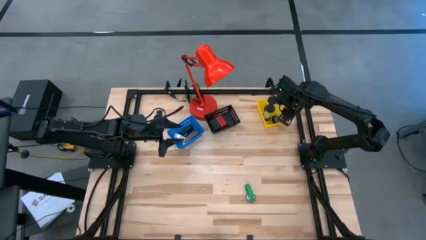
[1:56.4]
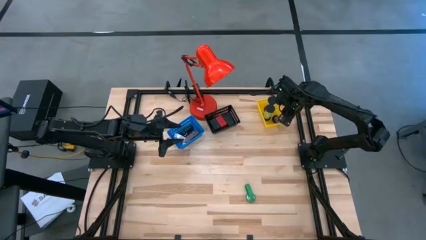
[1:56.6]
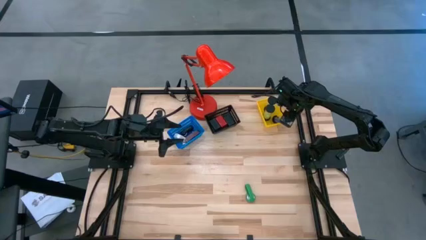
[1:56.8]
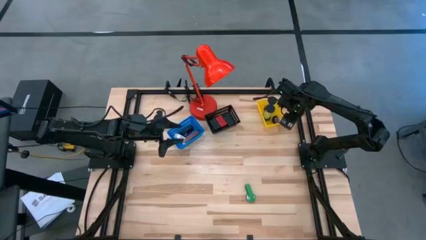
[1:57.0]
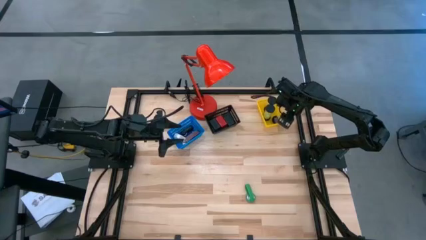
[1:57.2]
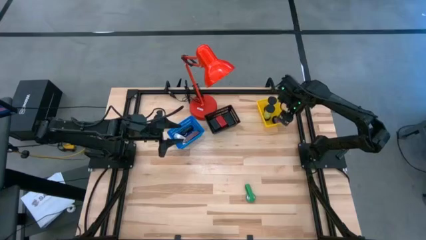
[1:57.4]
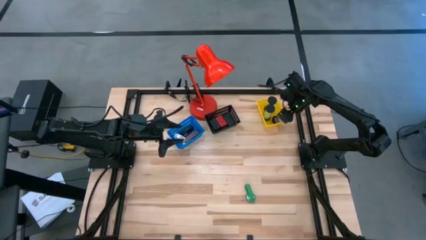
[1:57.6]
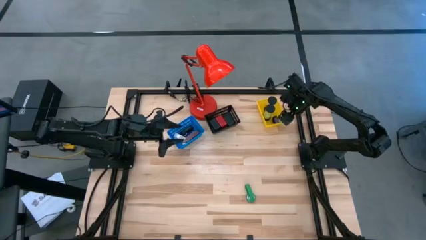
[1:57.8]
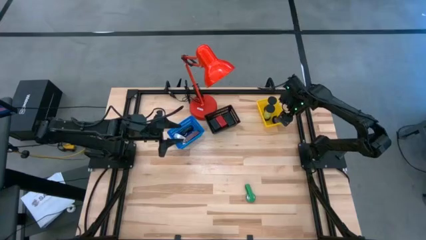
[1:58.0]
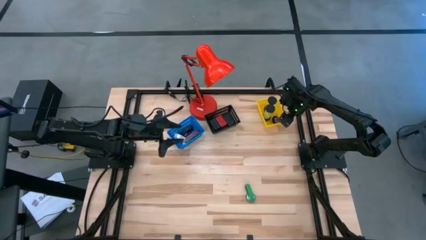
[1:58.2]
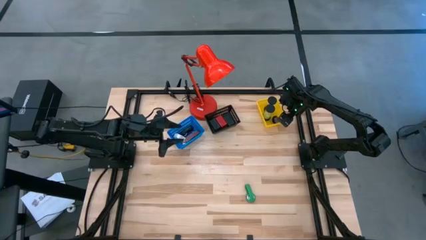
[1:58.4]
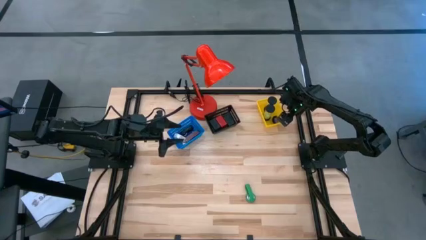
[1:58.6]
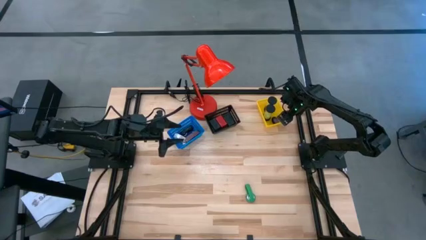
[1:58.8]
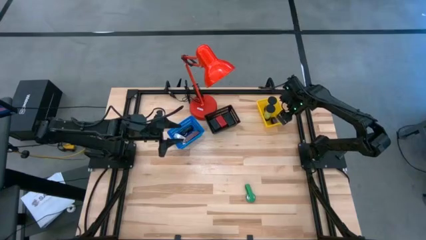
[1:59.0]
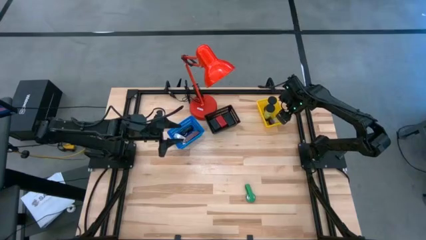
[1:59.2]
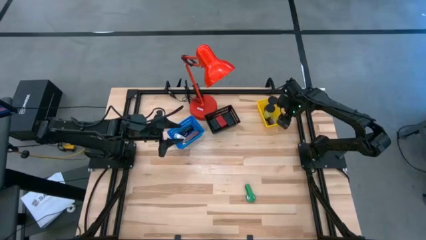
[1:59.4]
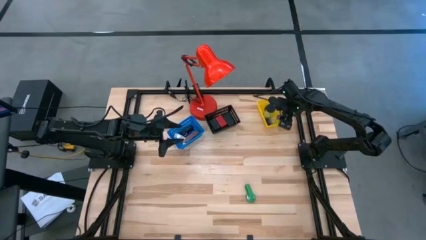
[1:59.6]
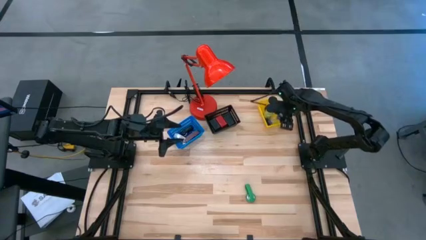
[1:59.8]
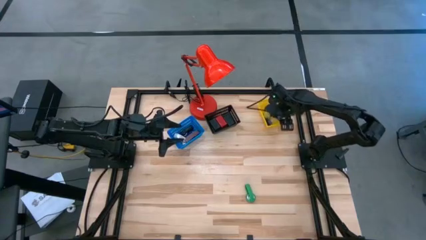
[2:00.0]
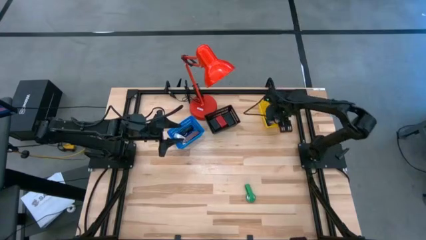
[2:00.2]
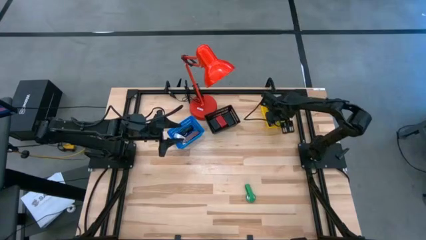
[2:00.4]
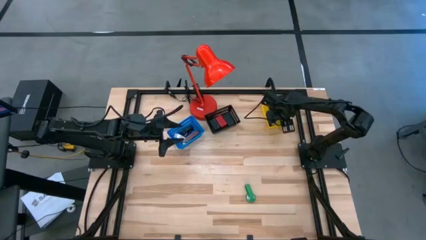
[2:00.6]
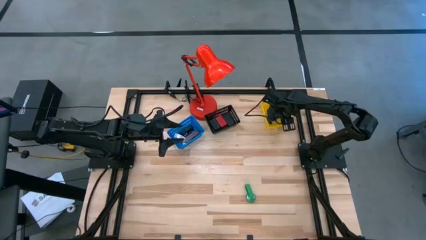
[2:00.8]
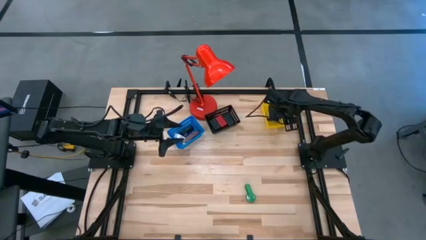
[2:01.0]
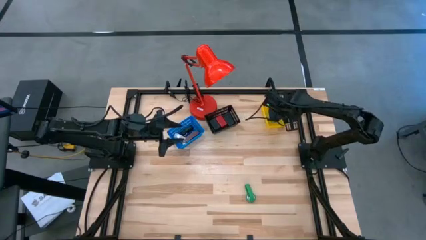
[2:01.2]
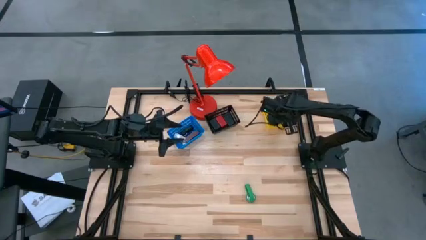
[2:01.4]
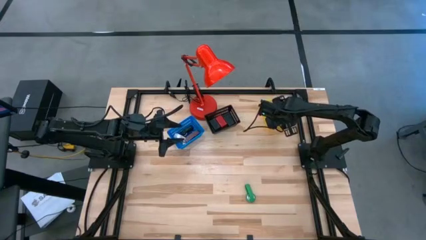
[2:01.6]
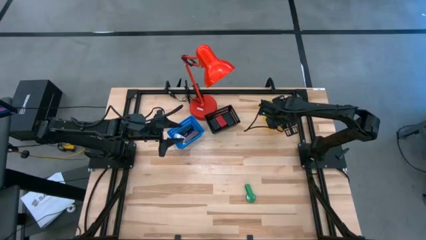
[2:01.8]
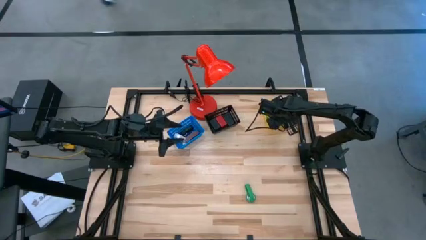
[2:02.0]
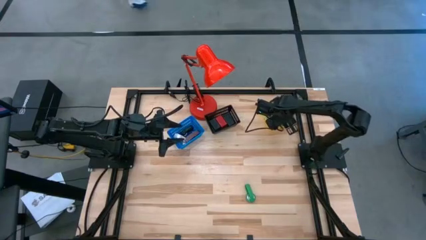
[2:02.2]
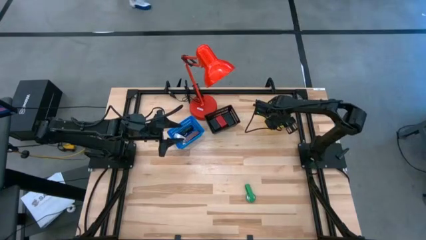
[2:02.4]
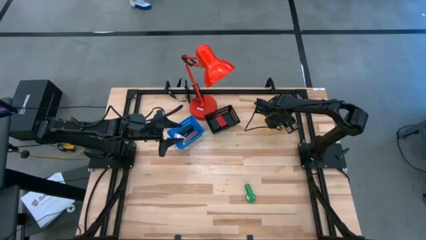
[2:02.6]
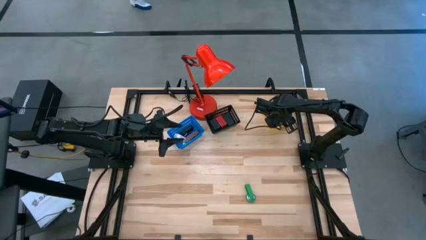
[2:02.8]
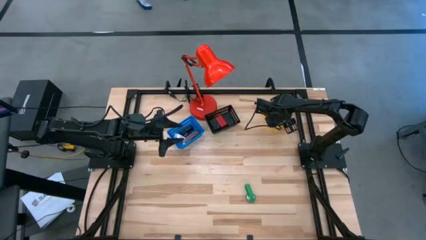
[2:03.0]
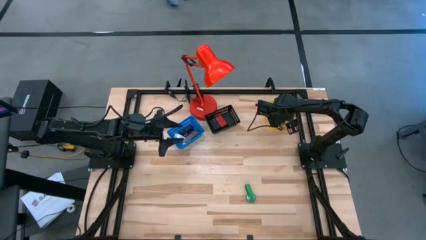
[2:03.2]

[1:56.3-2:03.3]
Task: Pick & Place Office items
Put the blue hourglass into the yellow bin

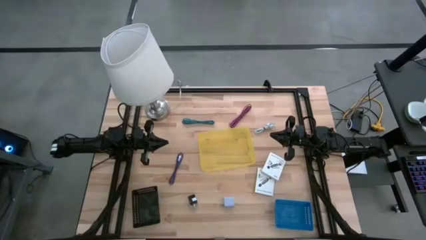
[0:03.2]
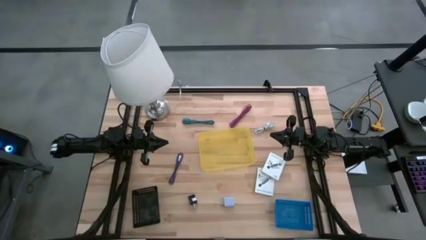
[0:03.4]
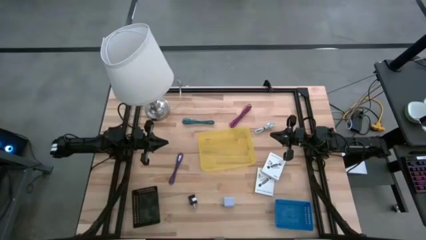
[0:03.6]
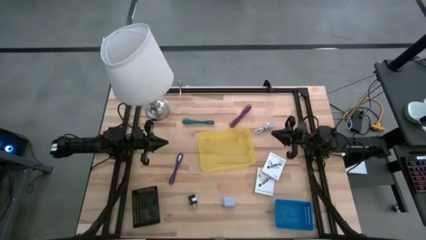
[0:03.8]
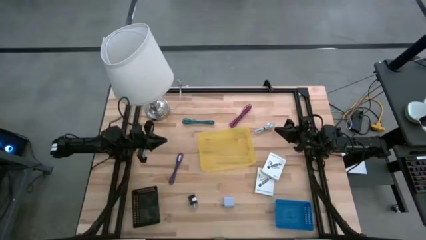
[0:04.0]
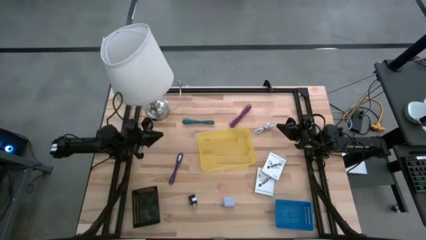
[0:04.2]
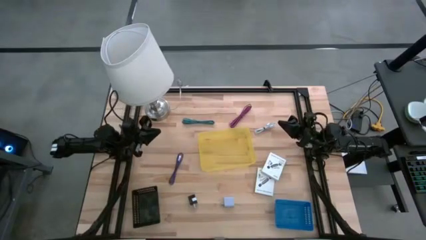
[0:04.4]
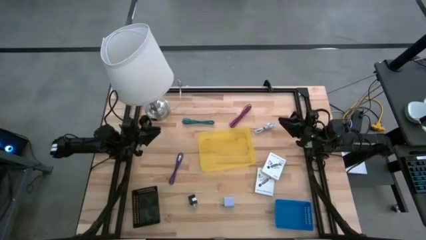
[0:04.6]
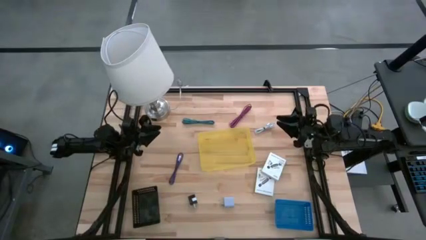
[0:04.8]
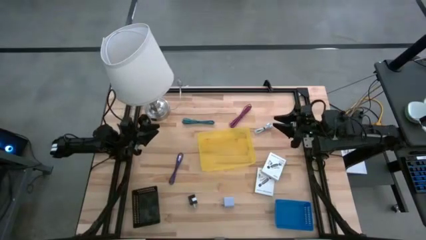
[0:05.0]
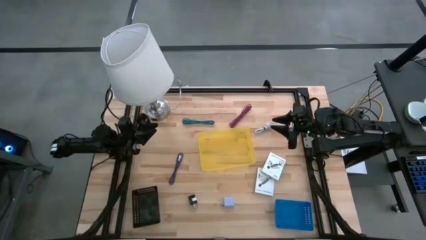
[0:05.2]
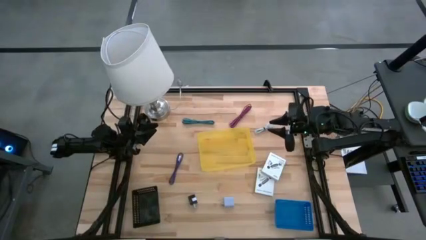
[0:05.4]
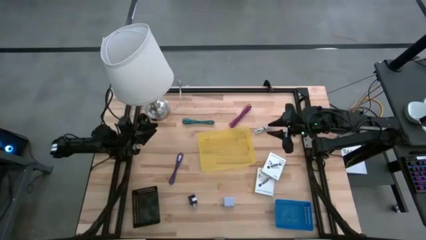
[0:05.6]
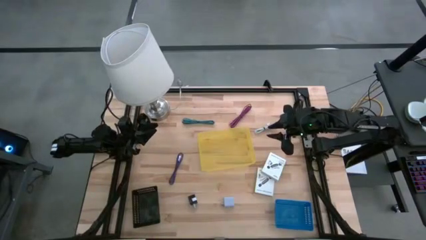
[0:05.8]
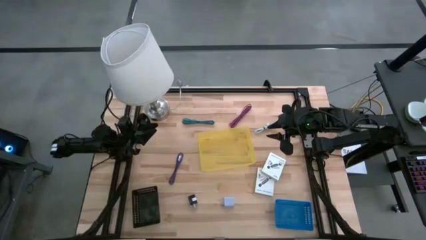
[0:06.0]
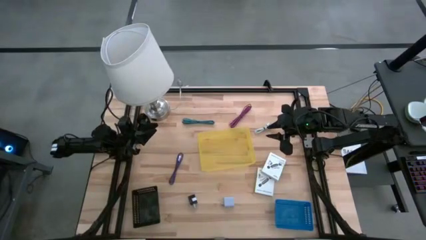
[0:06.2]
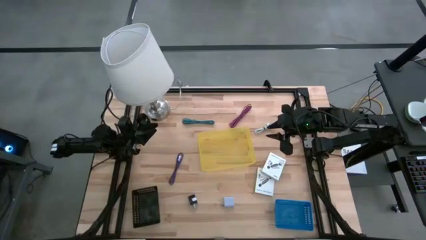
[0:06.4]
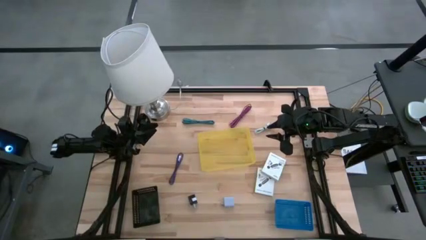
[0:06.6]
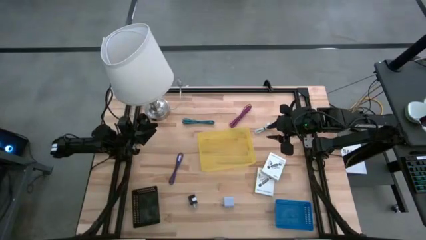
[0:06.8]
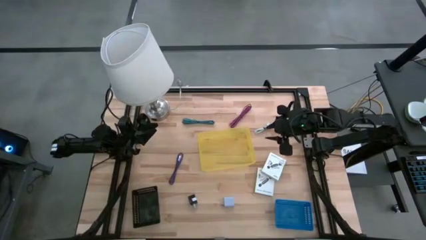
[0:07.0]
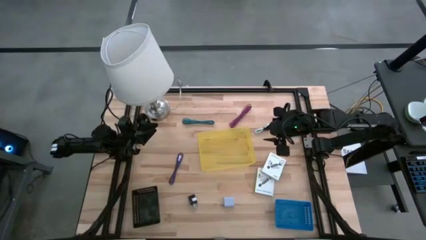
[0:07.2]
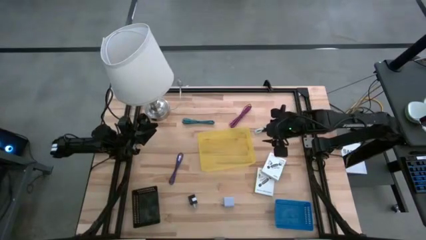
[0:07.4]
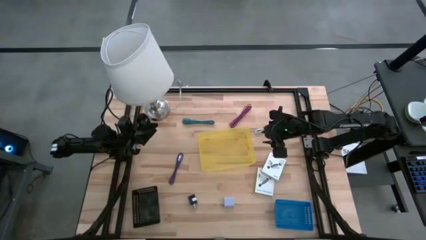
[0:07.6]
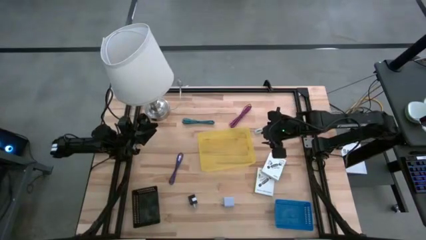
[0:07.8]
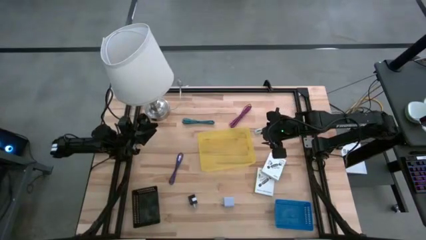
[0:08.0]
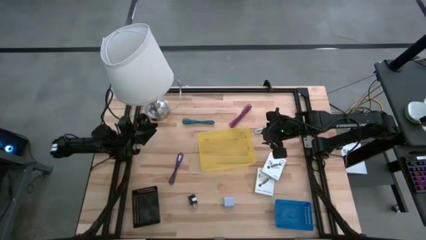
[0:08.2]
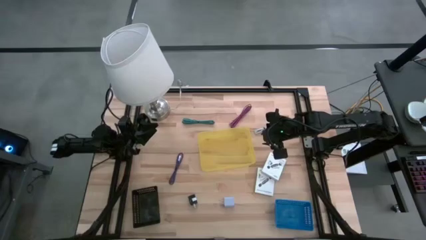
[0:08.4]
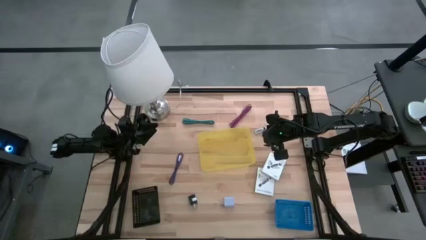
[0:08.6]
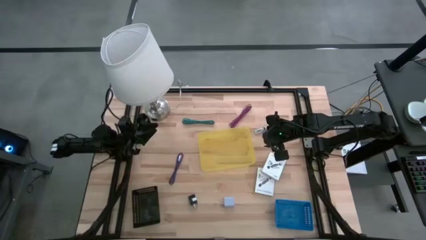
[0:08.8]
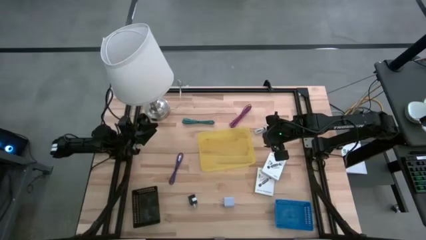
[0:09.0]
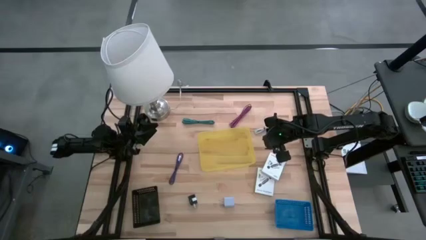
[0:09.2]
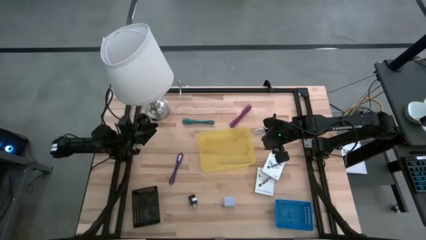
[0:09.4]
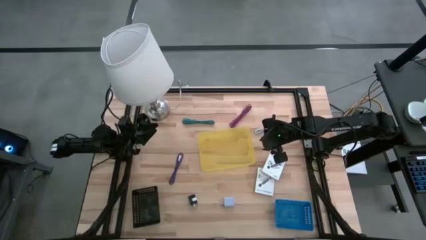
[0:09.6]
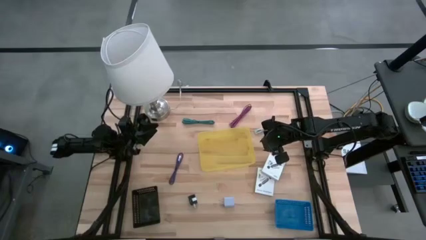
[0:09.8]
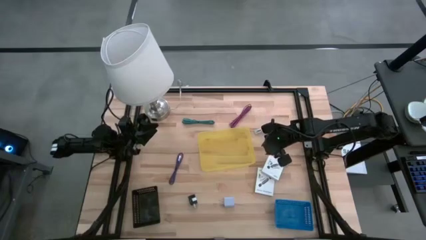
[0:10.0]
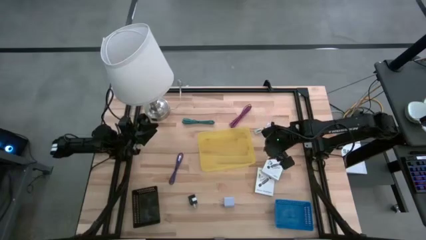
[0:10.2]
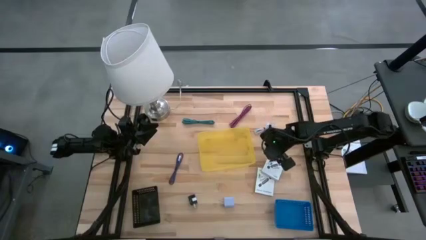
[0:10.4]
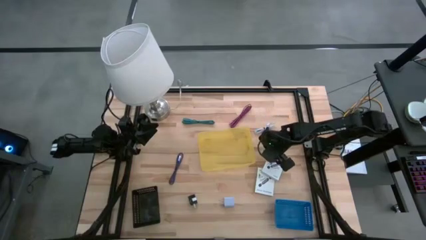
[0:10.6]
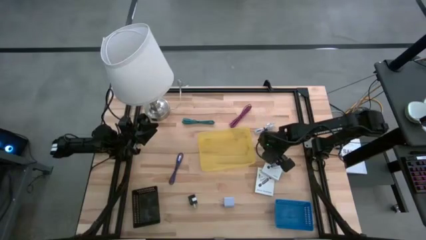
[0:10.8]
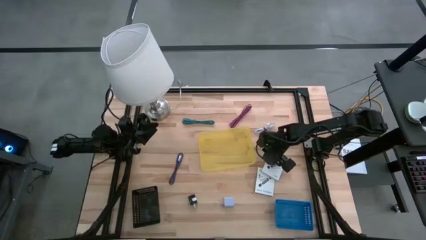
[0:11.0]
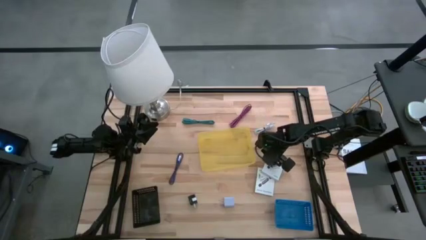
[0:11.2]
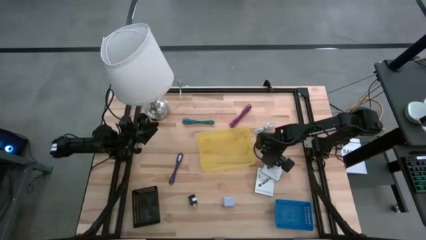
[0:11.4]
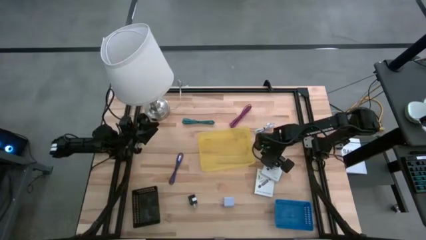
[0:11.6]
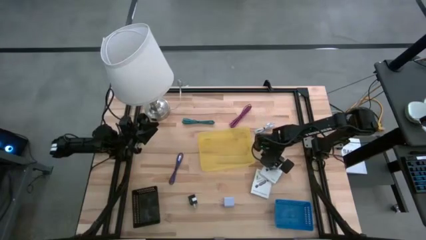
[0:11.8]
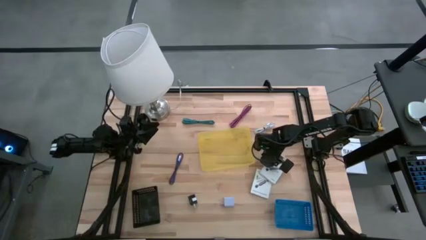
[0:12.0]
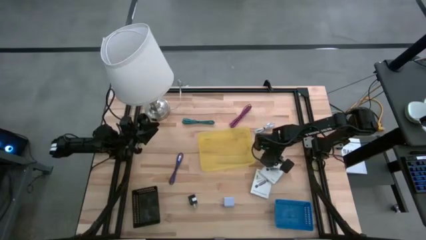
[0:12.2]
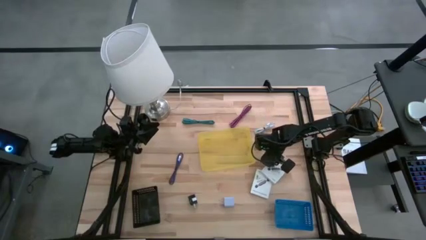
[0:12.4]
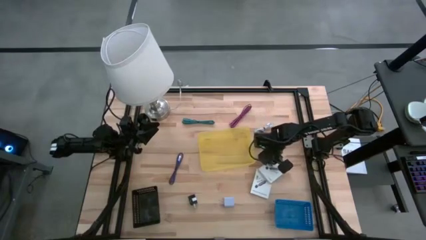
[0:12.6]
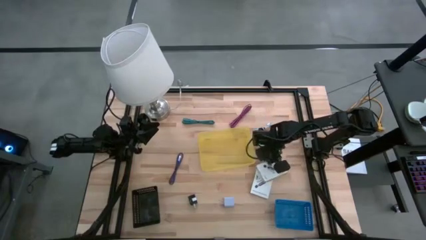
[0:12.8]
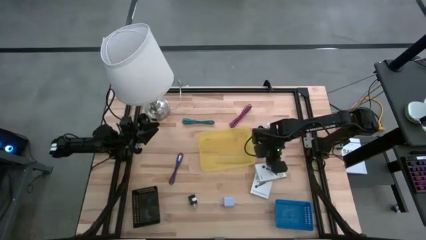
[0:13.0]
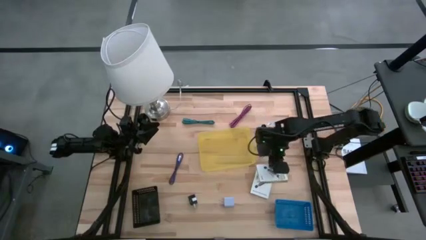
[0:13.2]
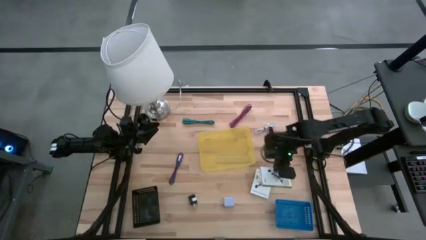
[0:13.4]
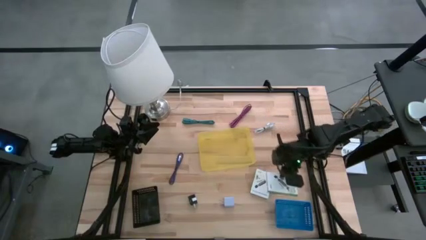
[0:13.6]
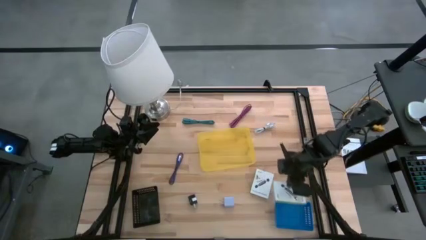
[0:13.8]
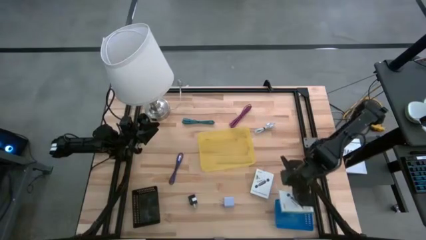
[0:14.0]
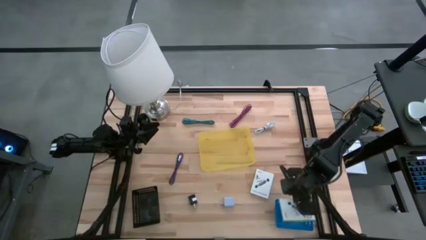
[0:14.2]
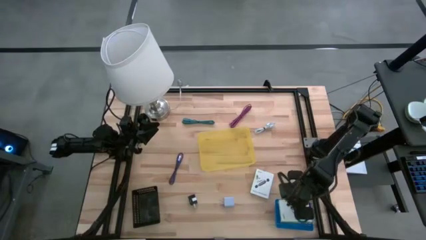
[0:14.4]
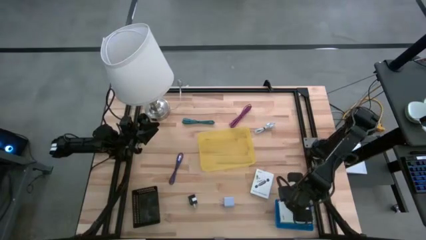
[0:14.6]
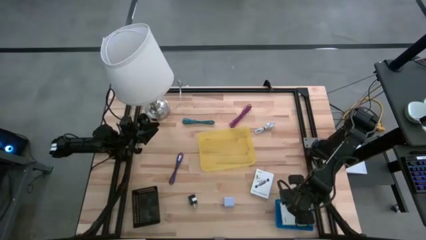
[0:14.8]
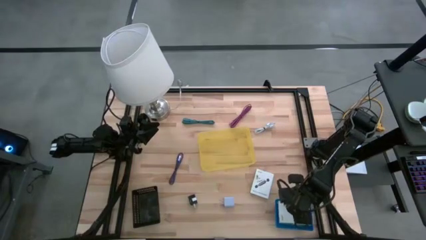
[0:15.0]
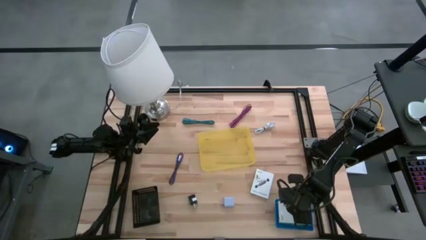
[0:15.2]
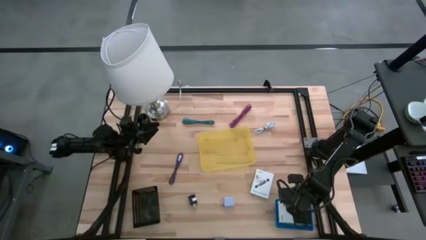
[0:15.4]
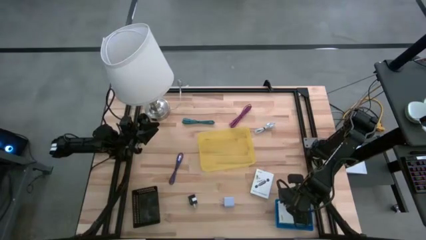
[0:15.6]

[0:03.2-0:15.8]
Task: Pick and place items into bin
Put the top card reader box into the blue bin
